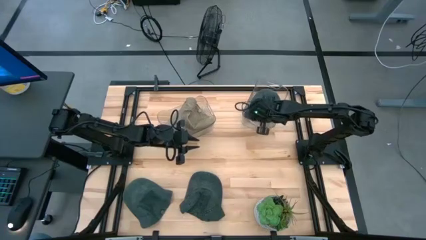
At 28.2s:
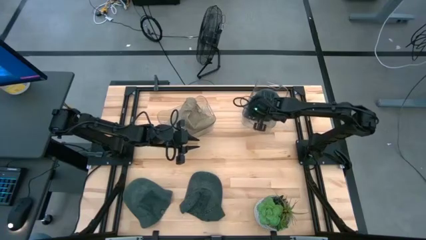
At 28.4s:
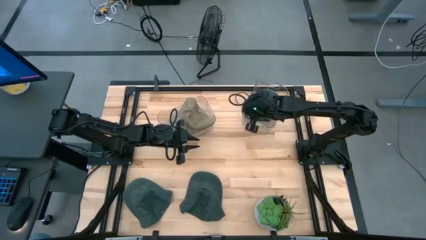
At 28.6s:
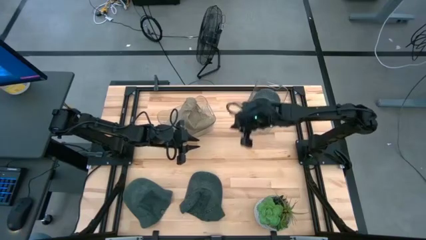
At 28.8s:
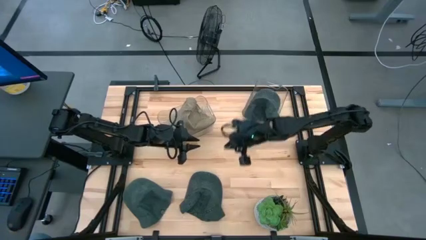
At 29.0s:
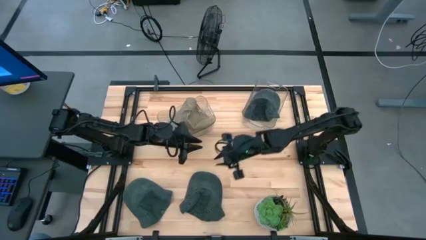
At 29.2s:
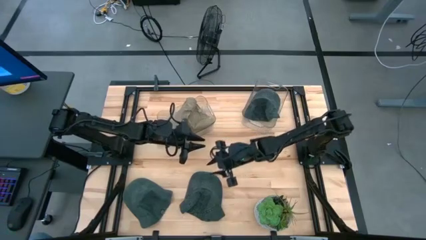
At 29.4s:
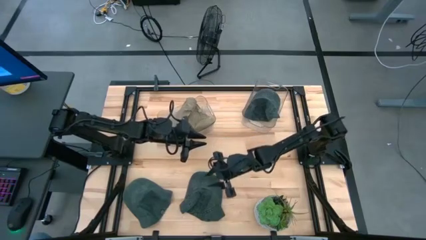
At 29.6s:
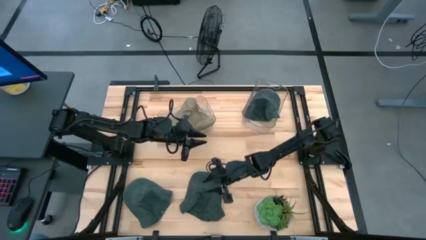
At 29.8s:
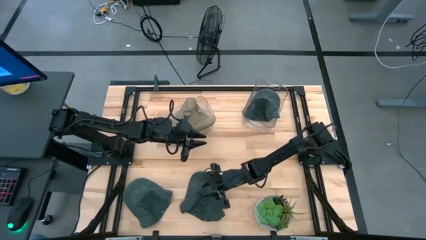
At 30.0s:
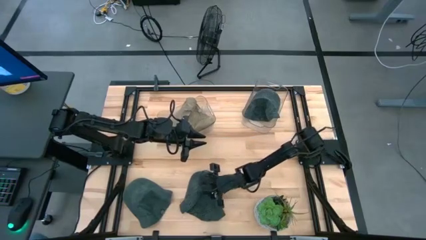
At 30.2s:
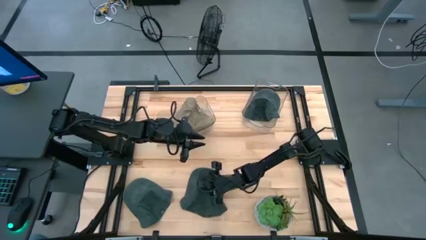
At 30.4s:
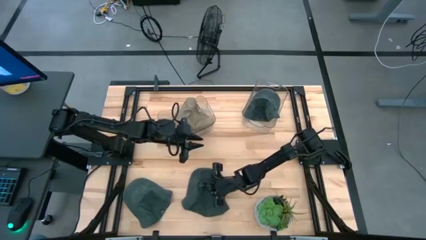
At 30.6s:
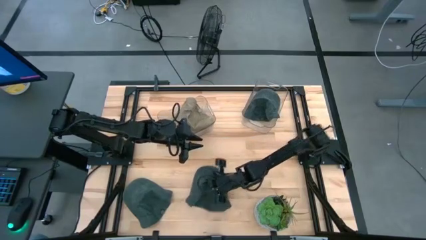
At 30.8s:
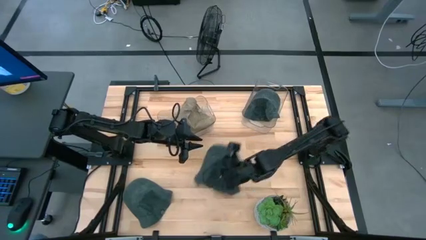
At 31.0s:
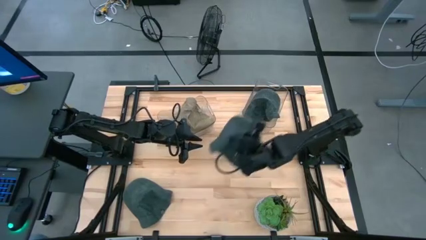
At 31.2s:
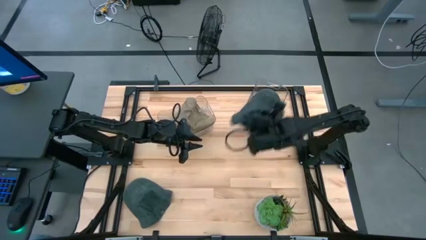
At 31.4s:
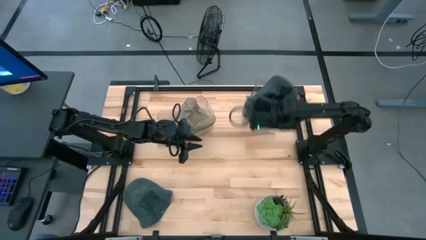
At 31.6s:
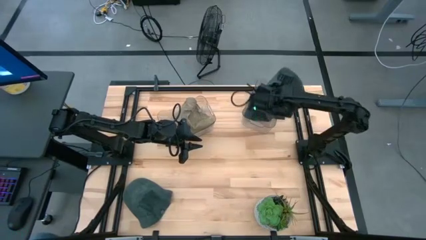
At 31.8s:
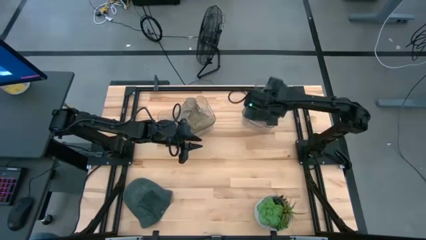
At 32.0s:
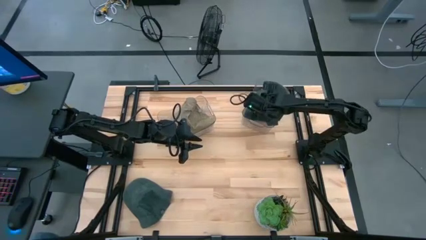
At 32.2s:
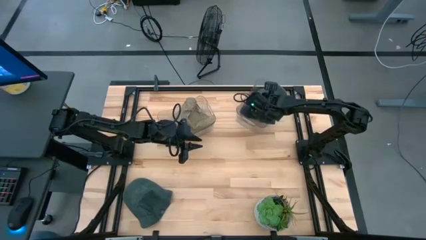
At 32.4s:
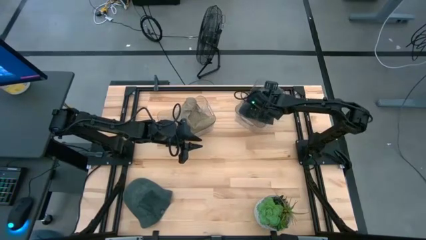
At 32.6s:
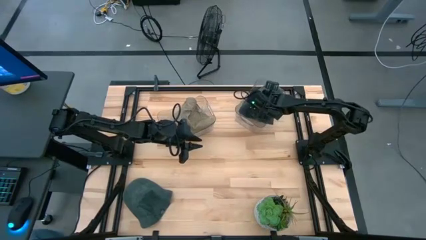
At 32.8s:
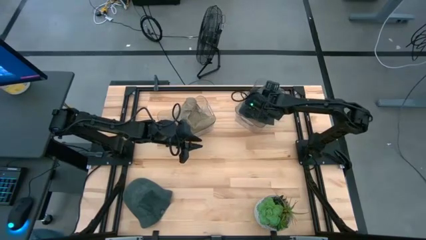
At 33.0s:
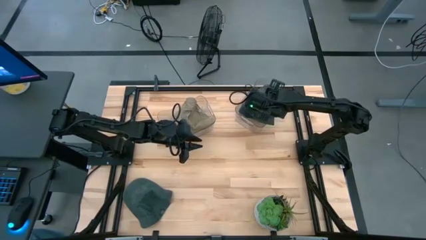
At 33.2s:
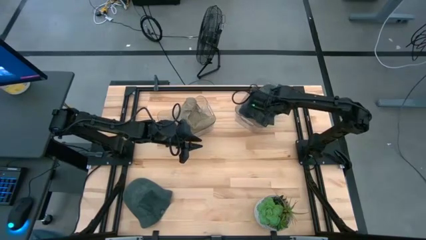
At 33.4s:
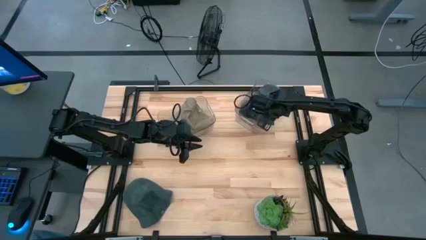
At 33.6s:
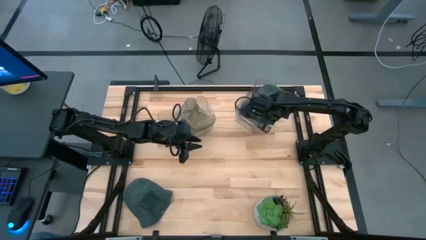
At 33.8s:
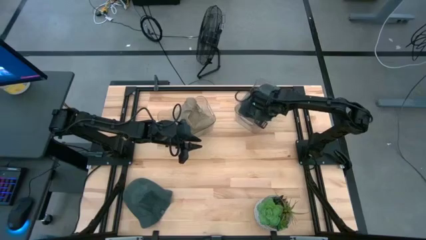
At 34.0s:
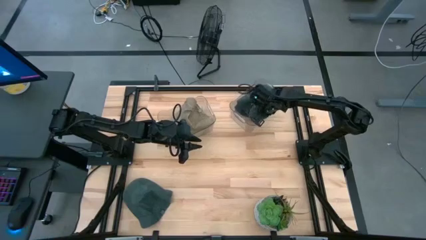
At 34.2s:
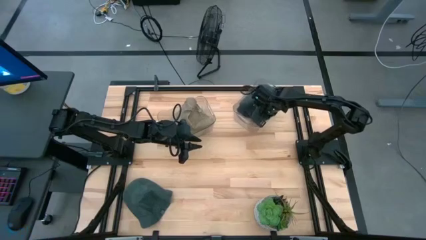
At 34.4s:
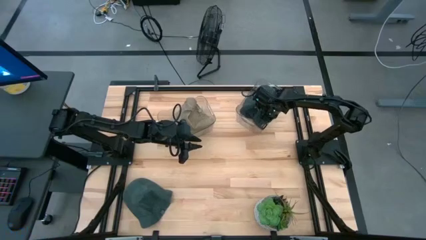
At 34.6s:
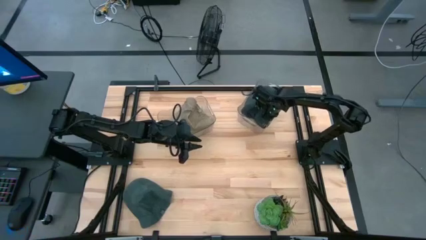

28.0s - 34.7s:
Task: Pick & Place hat
Put the right gray cap into the right transparent bin

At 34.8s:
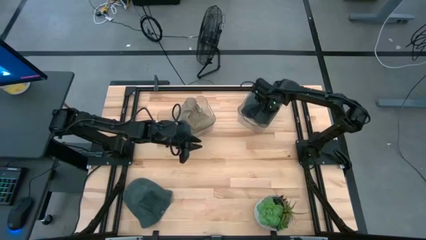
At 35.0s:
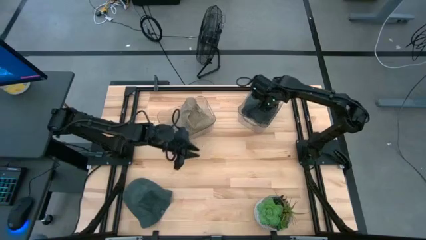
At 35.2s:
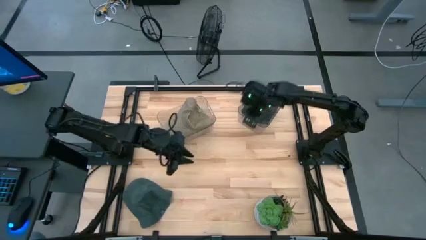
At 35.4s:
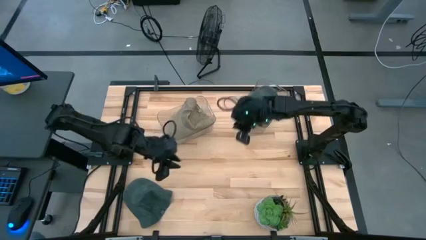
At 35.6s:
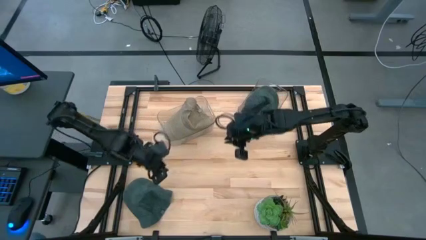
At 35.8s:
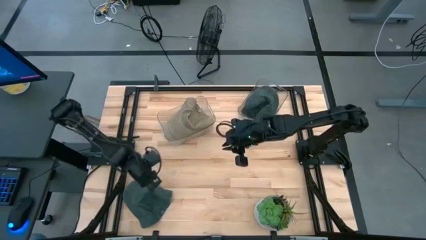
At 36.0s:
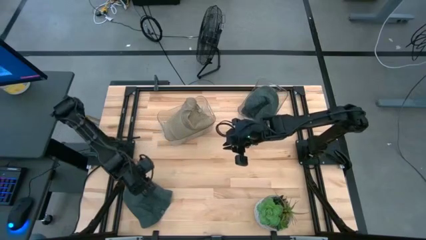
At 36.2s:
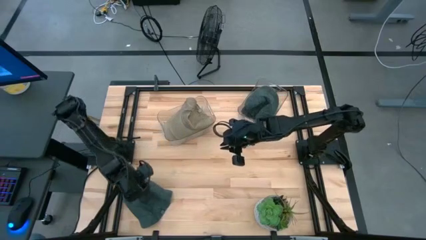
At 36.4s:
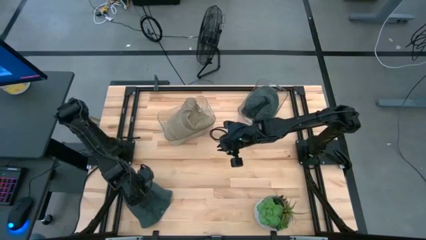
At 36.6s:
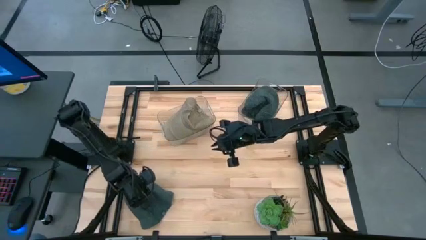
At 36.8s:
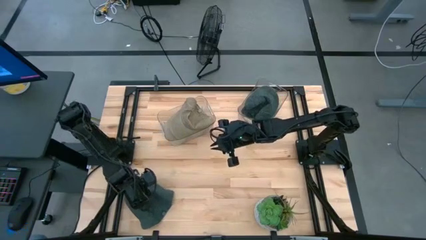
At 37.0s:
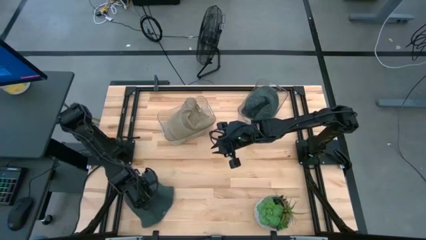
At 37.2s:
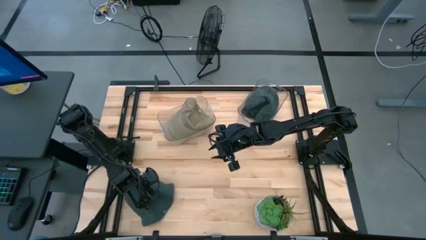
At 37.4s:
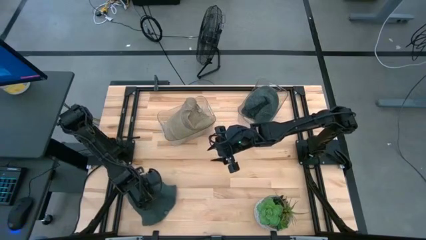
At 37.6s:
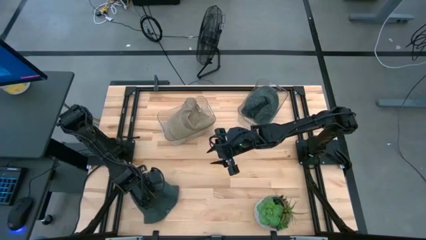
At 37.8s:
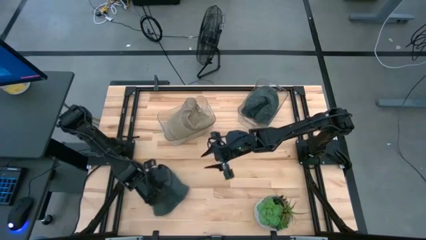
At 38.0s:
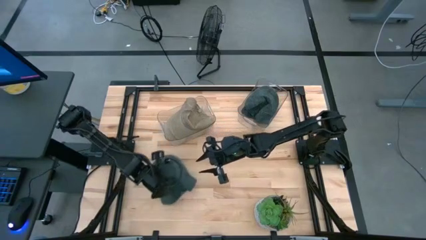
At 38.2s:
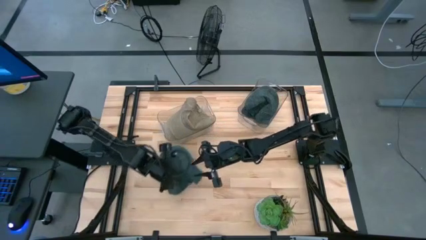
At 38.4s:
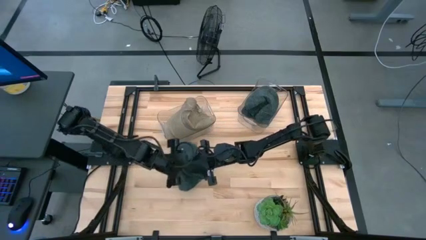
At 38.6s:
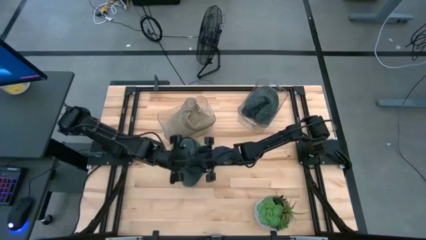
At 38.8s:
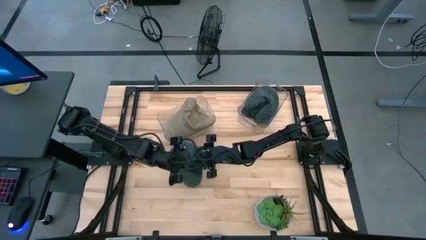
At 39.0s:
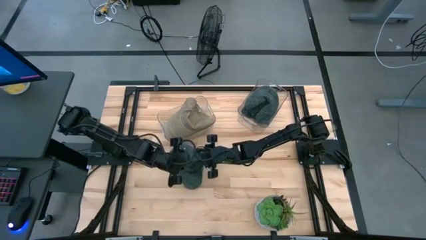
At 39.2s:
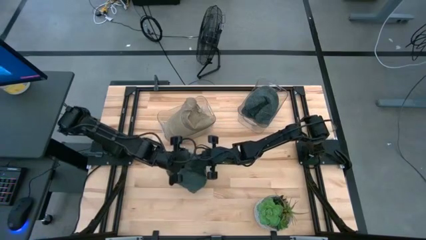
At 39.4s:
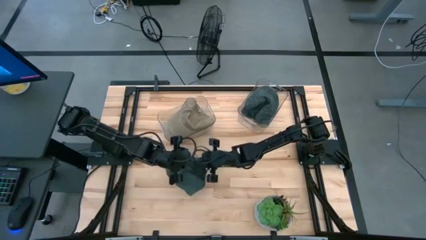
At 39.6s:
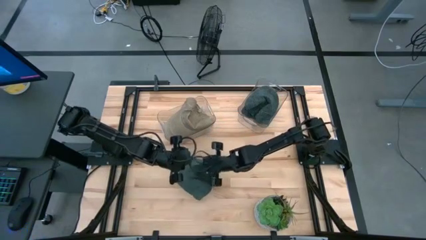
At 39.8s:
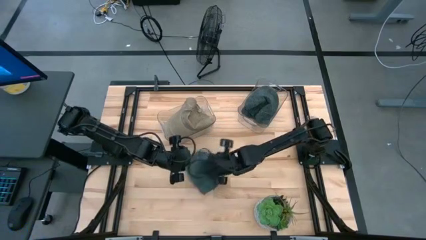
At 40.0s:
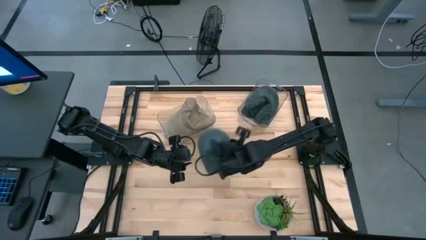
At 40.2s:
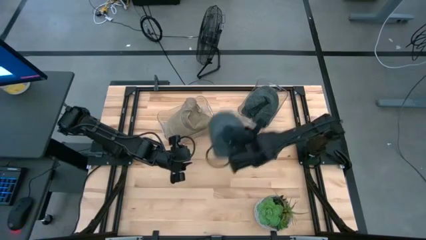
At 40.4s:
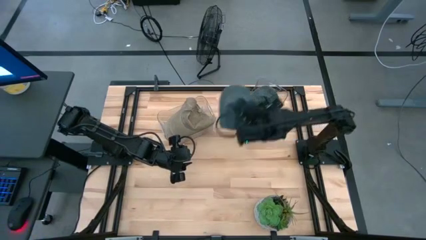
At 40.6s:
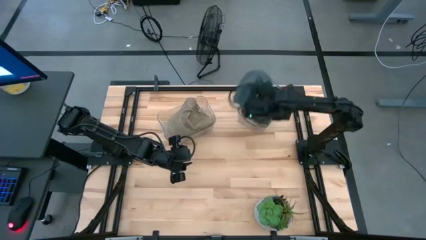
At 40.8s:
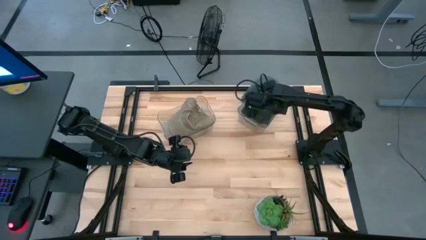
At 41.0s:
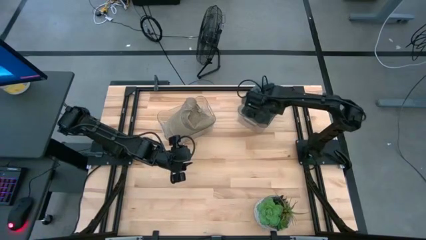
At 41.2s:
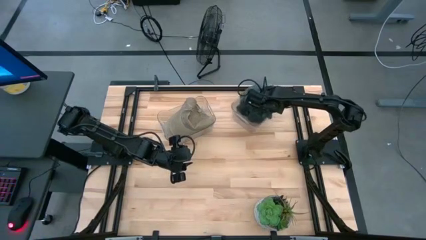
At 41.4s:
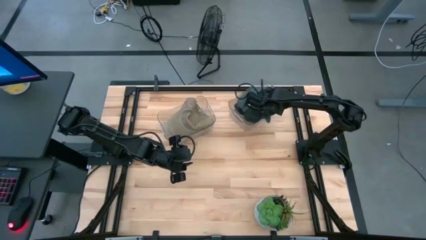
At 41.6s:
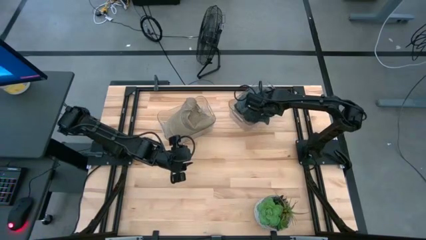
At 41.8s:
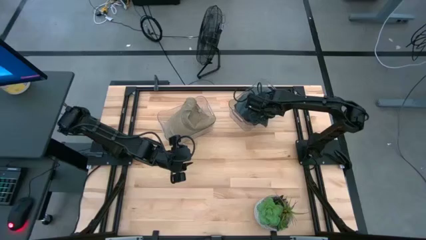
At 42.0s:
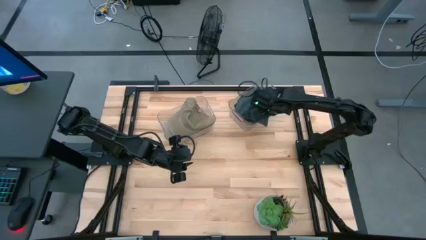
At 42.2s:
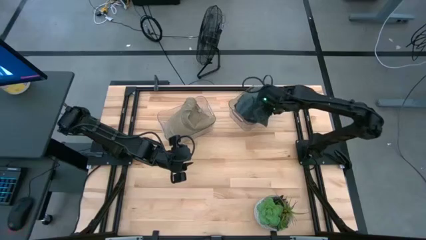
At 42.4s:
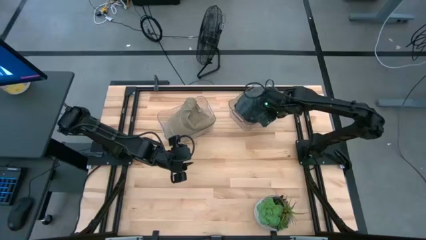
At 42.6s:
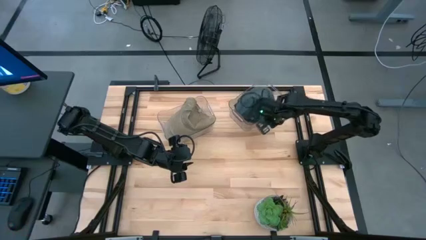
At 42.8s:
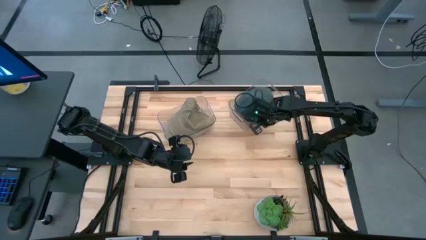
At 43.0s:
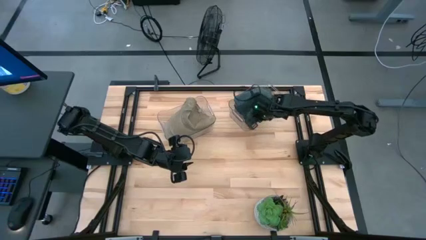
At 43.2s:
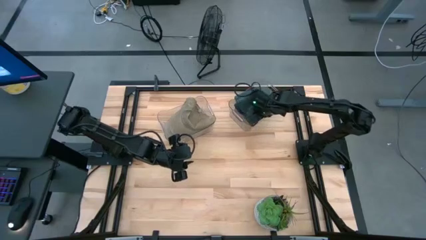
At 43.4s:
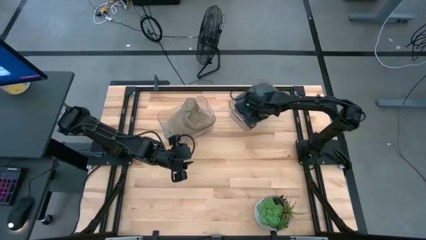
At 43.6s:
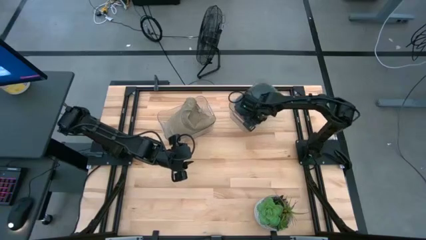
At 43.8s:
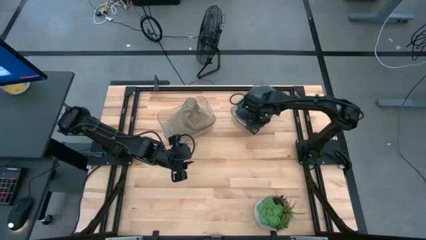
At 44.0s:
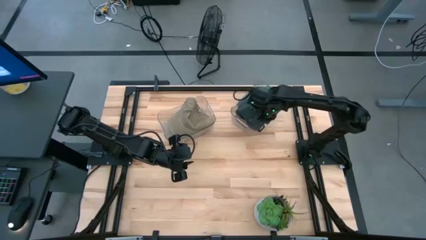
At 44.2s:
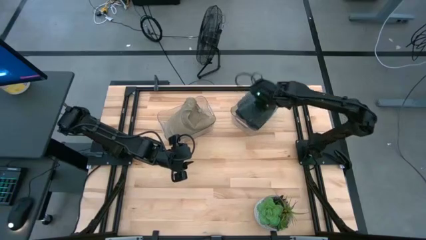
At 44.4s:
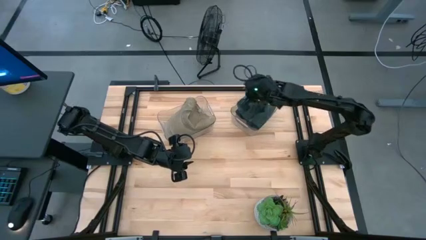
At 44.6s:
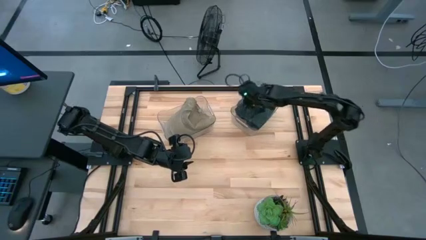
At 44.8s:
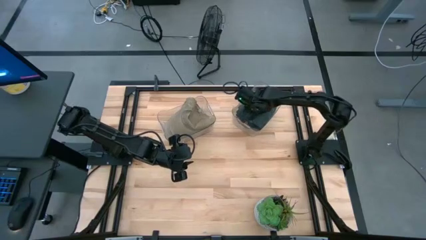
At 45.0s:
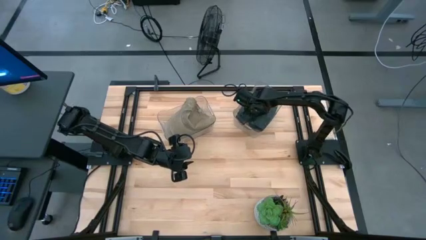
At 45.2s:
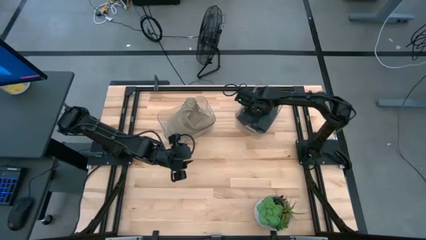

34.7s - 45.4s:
Put the gray cap into the right transparent bin

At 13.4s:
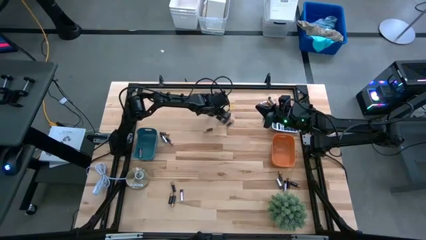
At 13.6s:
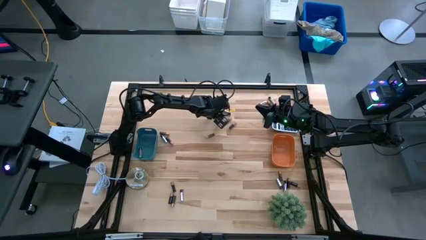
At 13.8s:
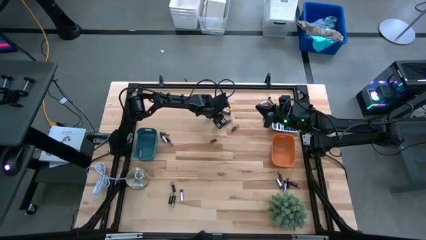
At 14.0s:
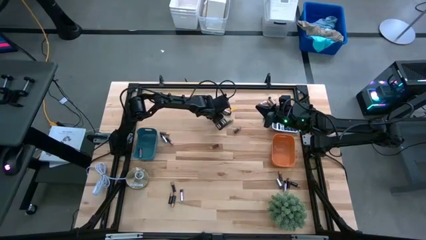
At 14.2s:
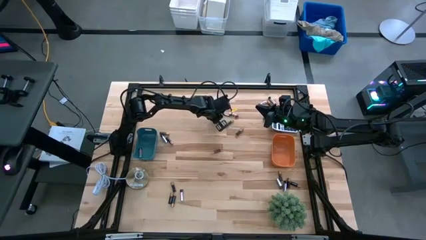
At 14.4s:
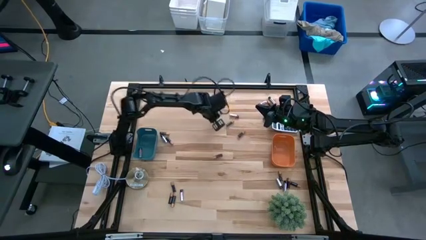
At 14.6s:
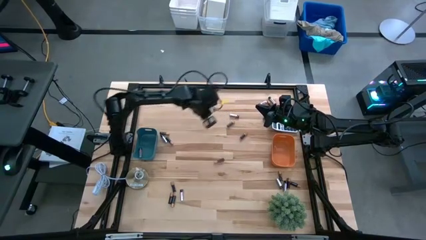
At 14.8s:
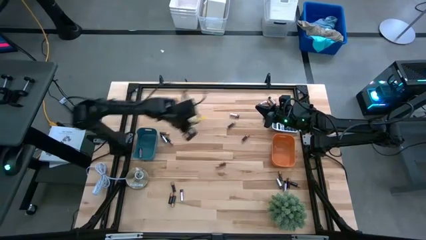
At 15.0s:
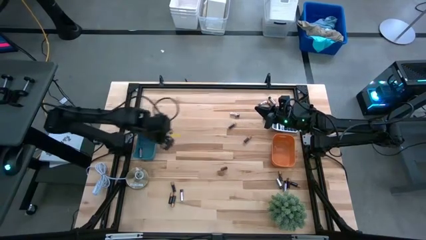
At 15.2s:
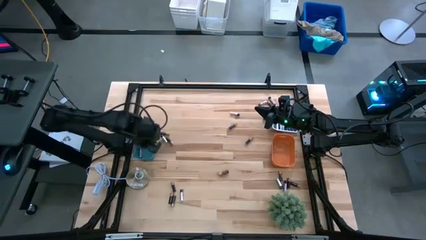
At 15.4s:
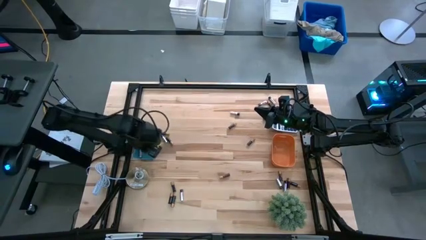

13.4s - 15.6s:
Task: Sort batteries
Put the silver battery into the blue bin
